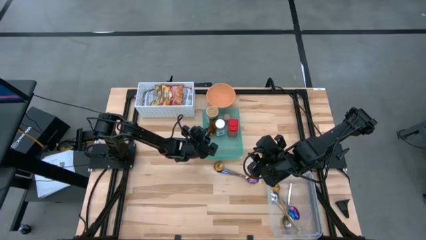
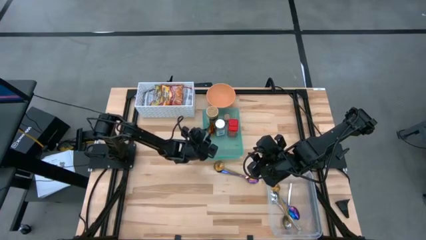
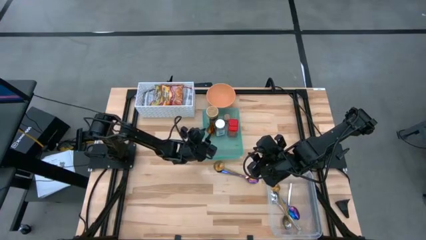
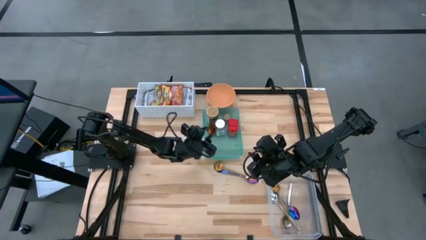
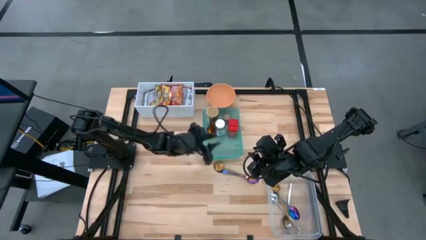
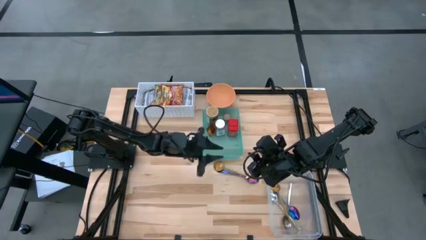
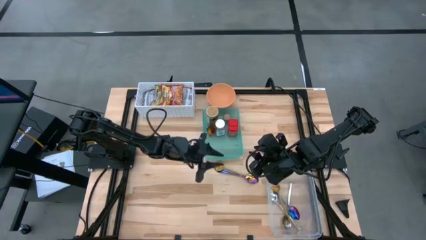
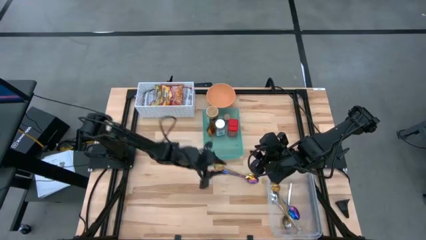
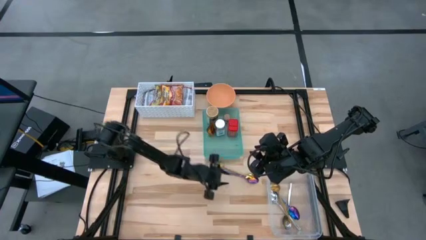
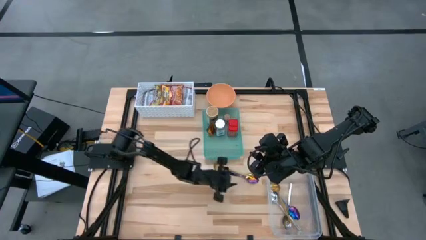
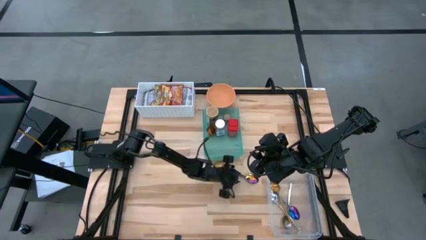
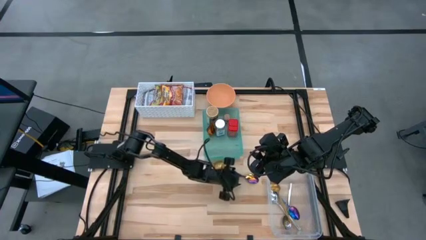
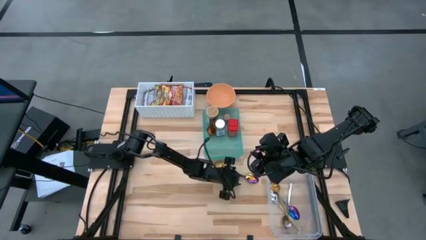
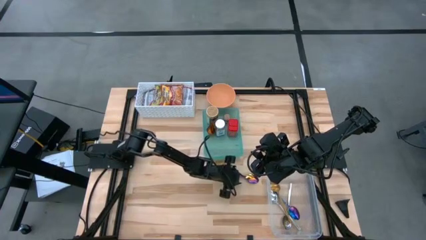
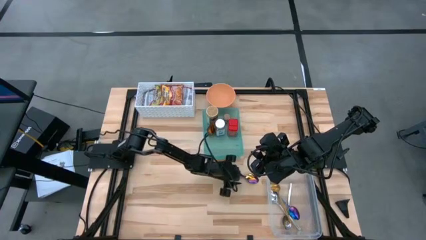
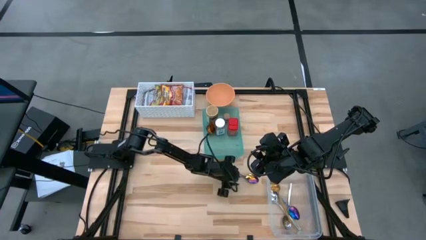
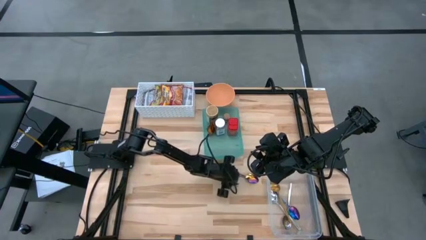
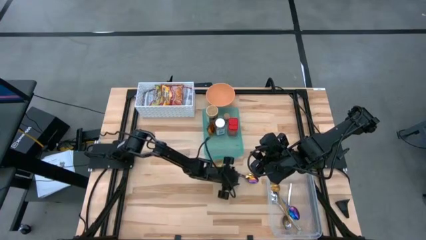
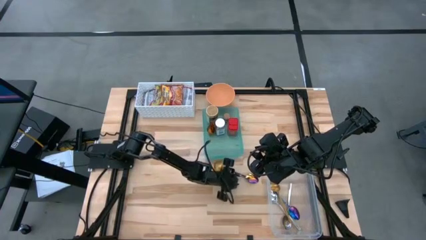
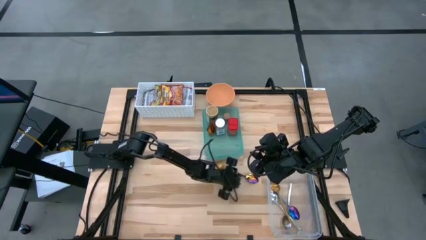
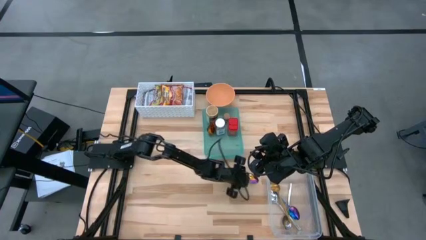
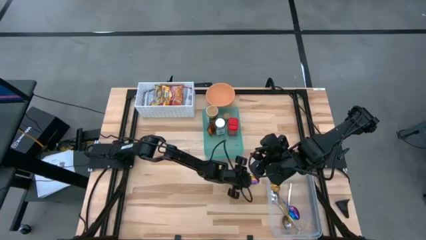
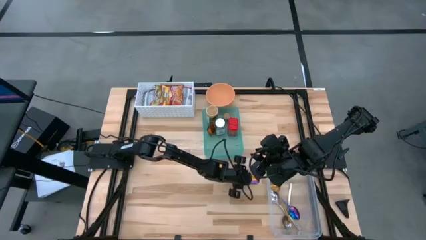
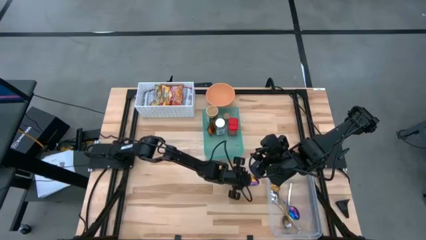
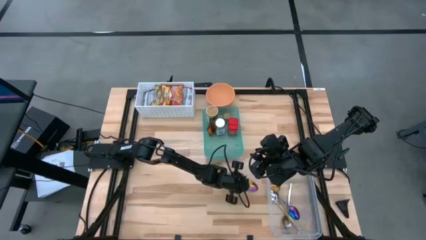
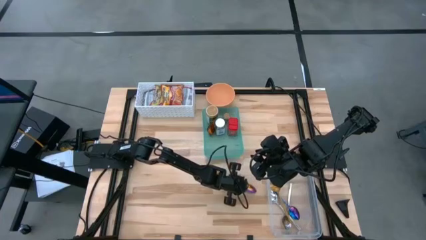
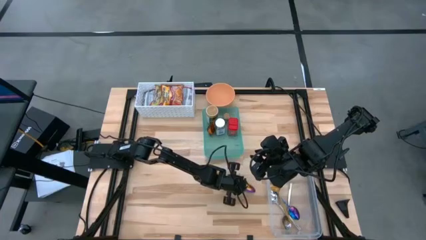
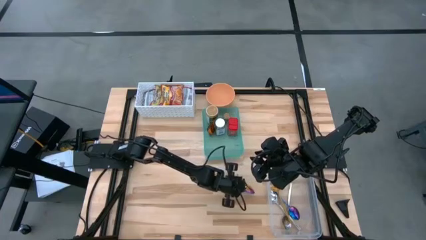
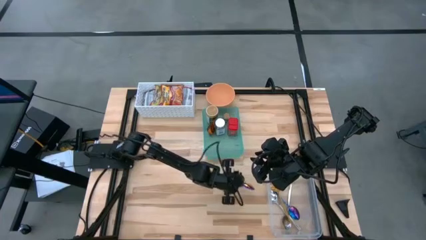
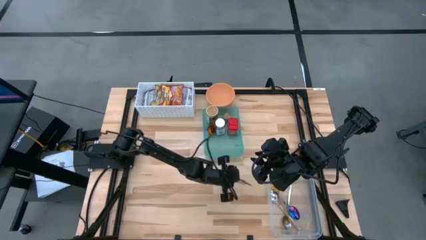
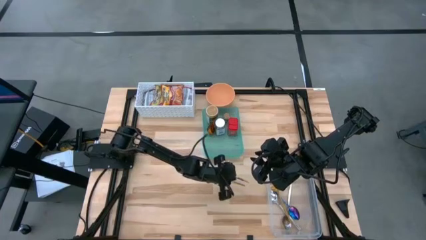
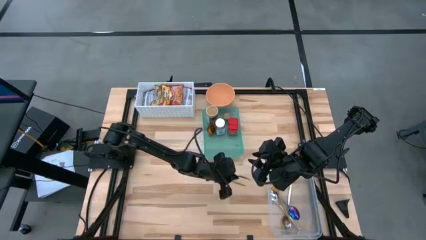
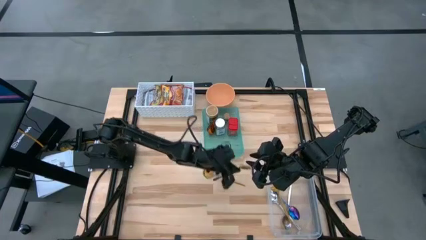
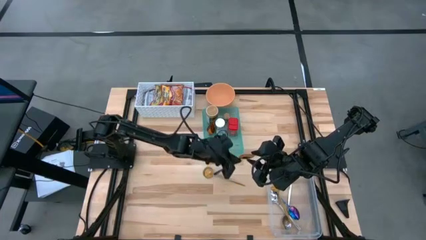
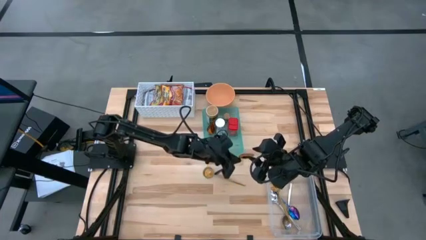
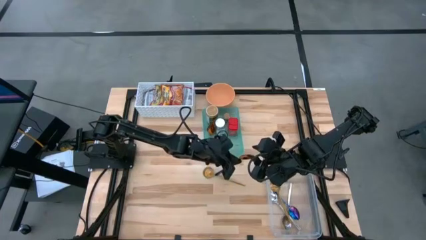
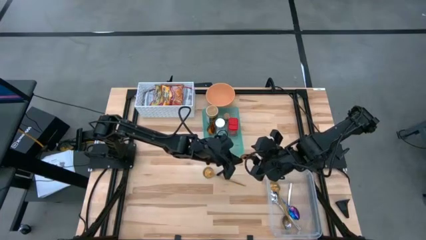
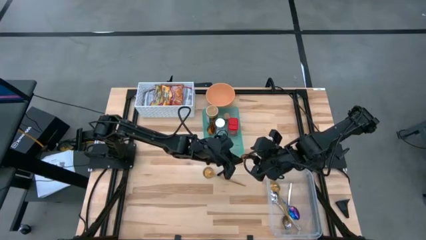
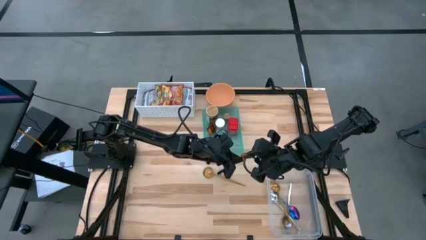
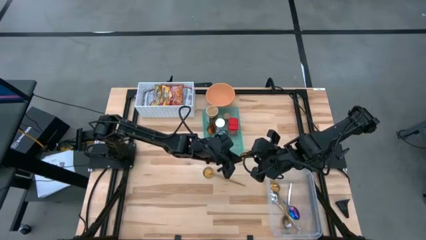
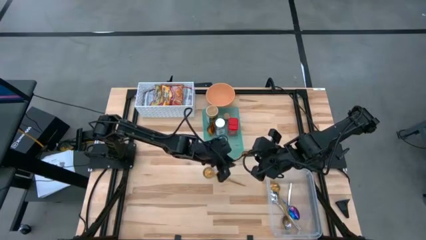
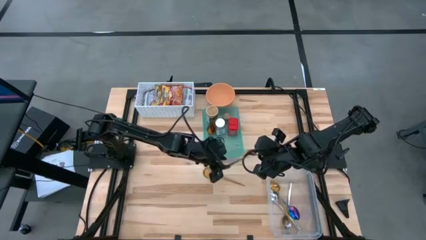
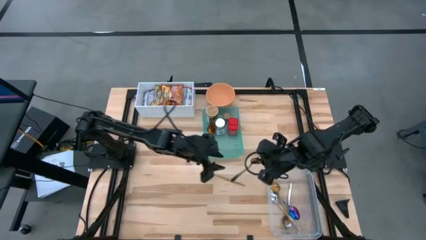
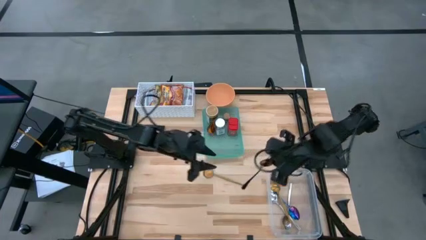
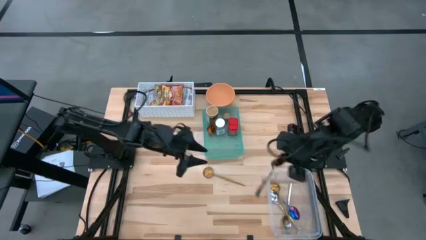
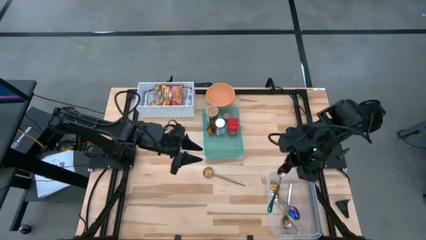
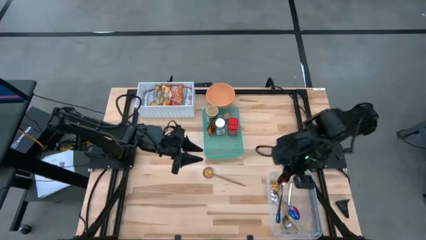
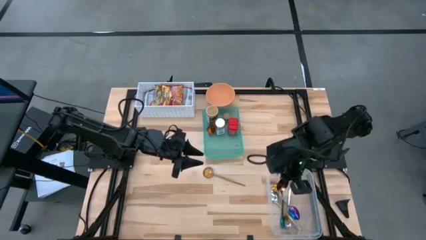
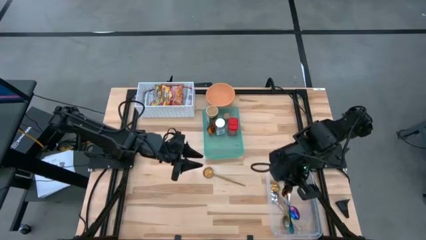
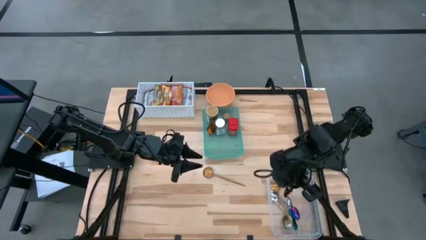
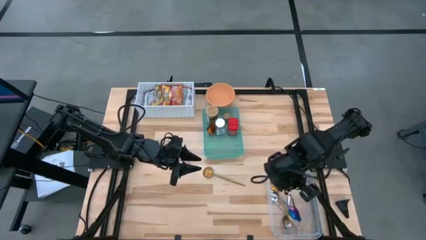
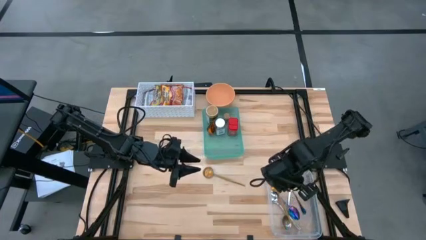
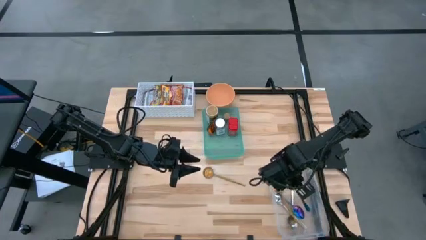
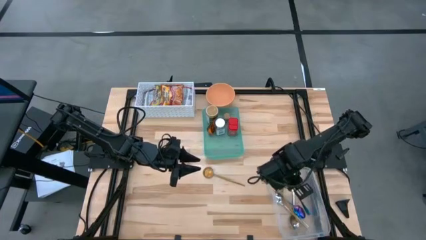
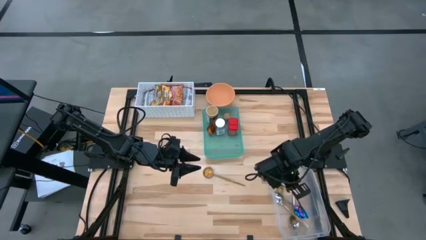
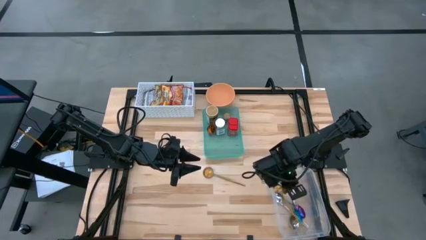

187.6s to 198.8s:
Task: Pick & Place Food Item
Put the blue spoon into the transparent bin

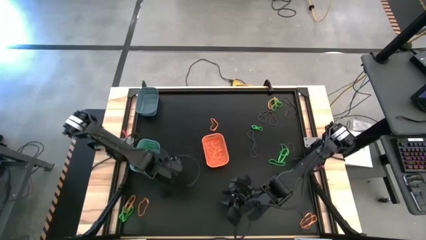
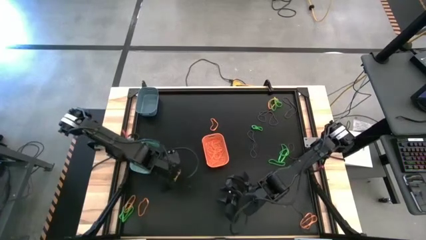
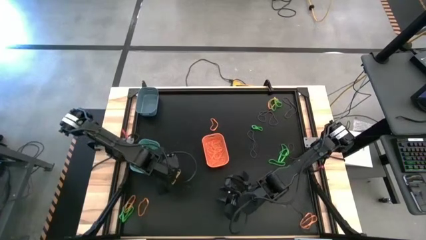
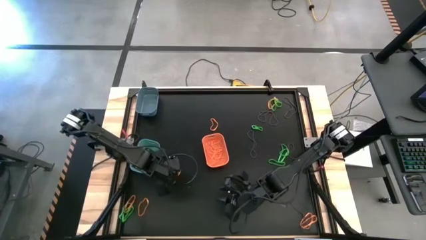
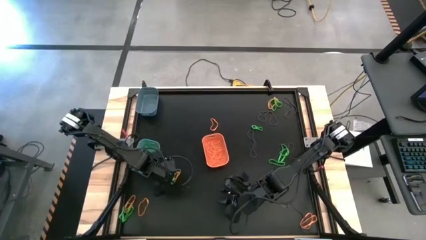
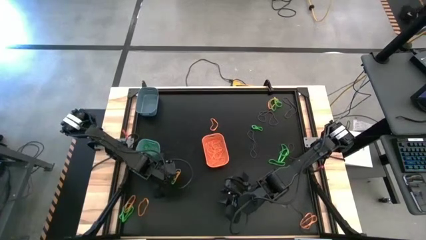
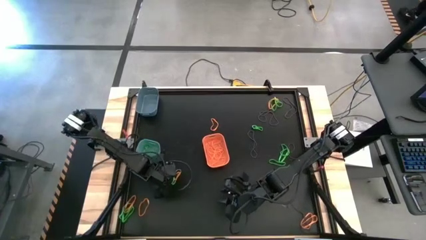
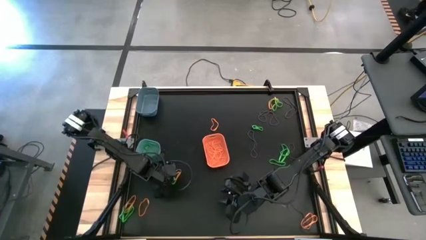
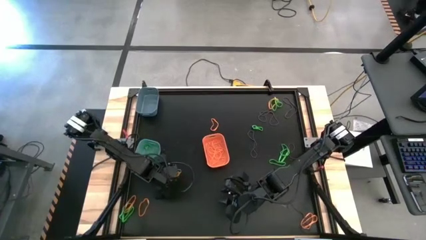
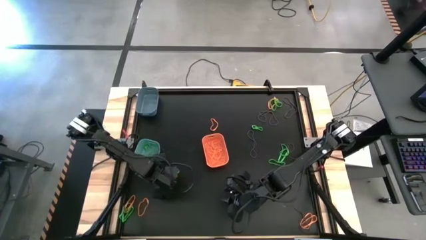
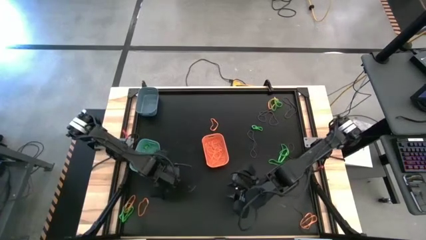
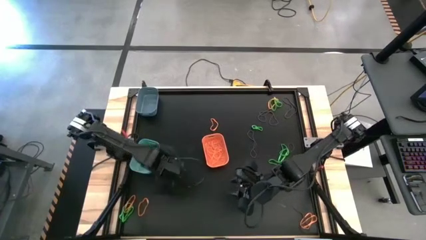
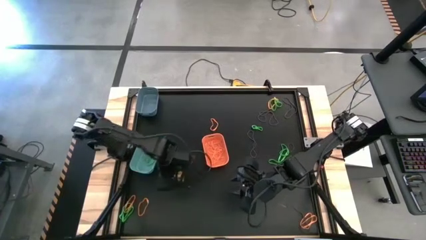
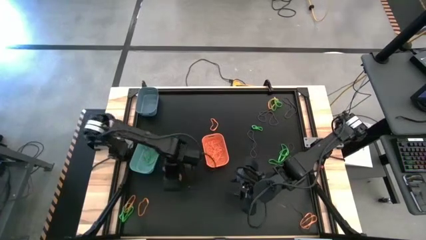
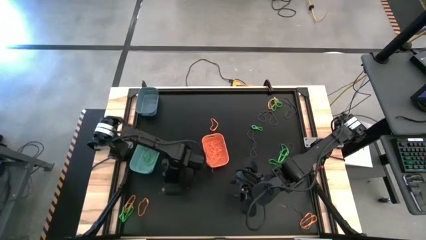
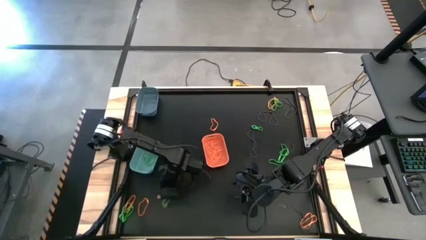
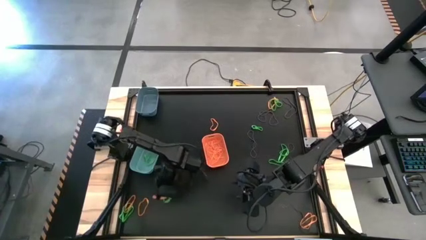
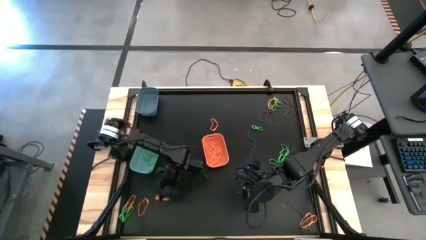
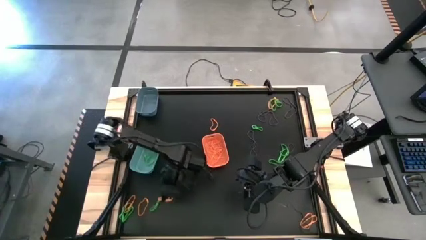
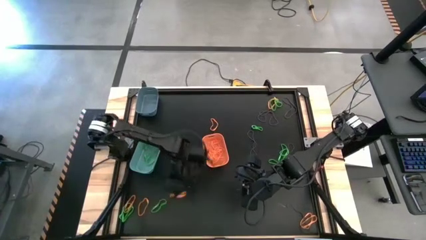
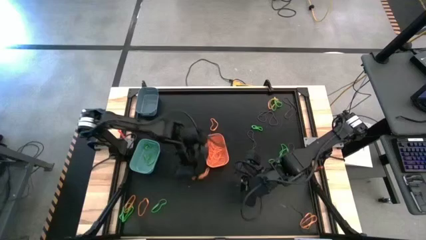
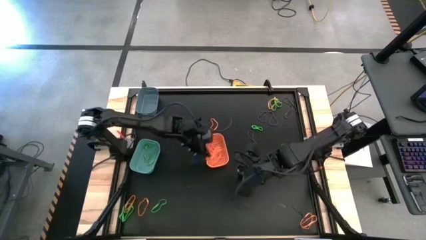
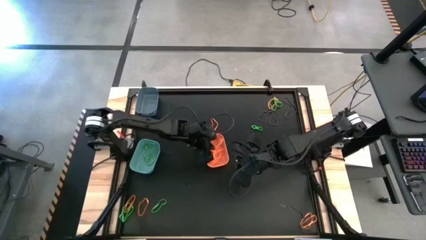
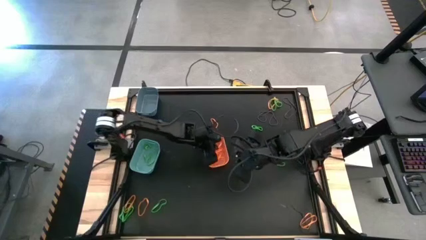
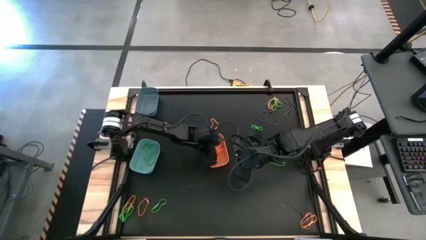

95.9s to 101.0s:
Task: Sort rubber bands into baskets
Put the orange rubber band into the orange bin
